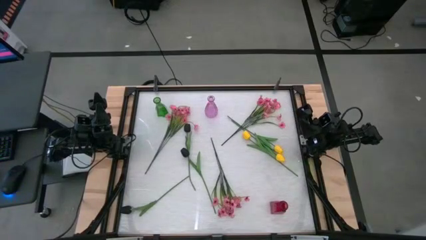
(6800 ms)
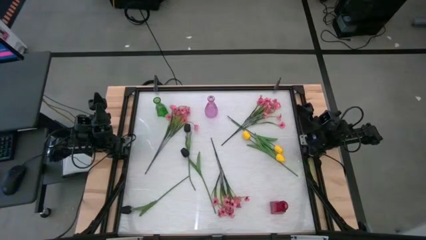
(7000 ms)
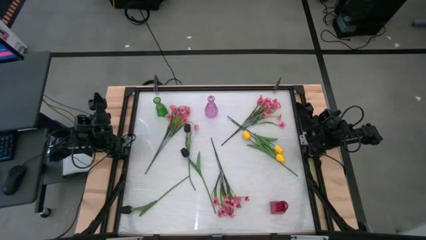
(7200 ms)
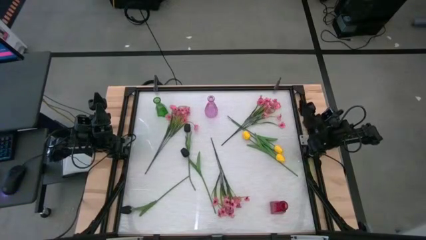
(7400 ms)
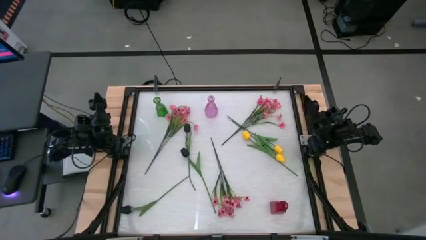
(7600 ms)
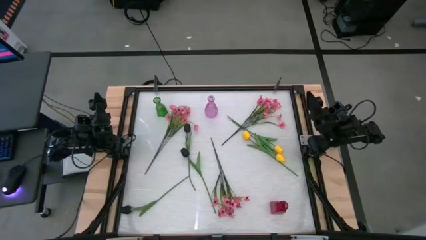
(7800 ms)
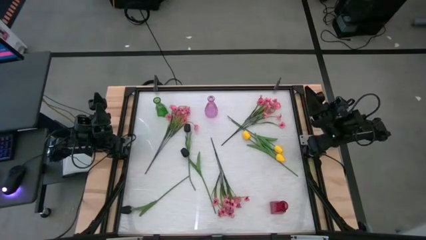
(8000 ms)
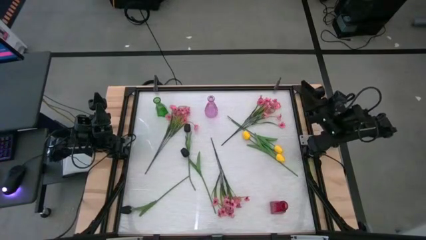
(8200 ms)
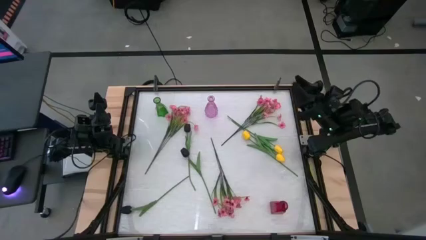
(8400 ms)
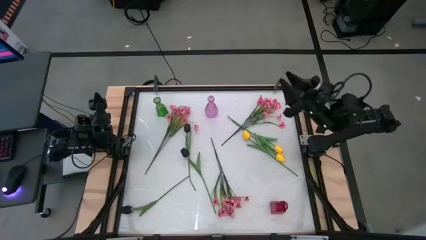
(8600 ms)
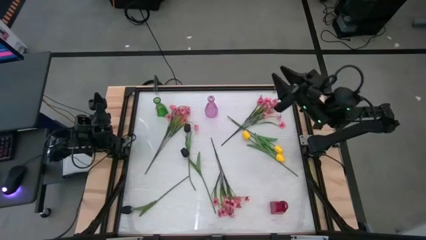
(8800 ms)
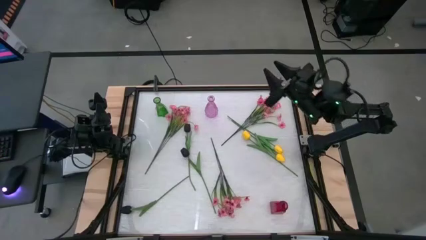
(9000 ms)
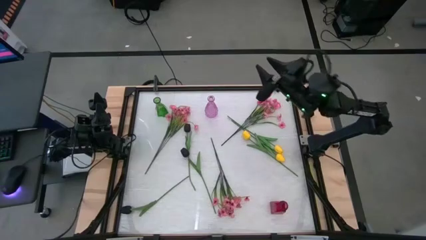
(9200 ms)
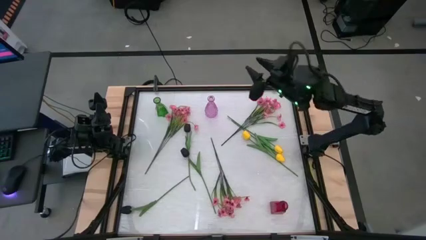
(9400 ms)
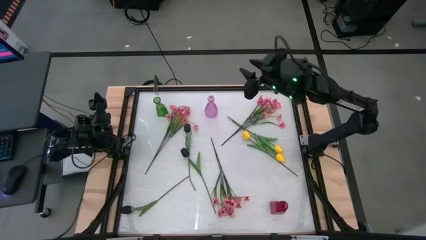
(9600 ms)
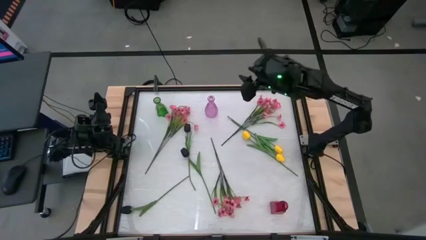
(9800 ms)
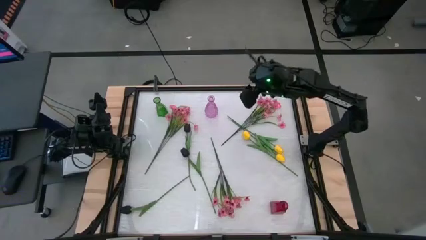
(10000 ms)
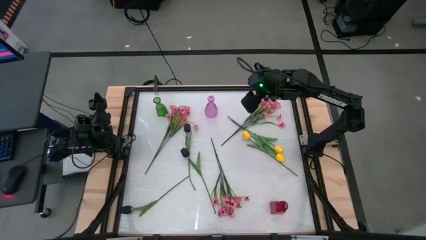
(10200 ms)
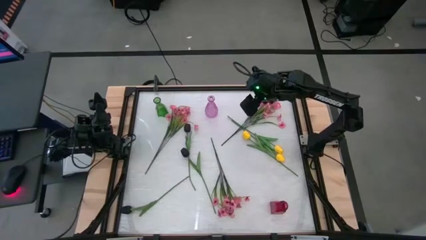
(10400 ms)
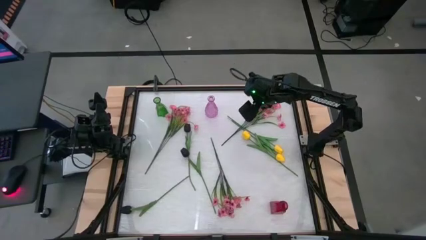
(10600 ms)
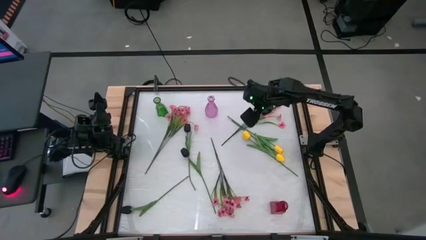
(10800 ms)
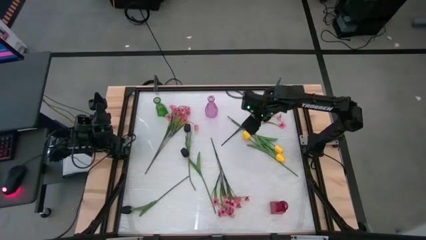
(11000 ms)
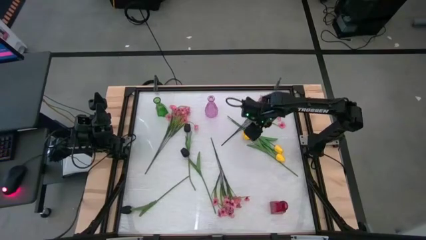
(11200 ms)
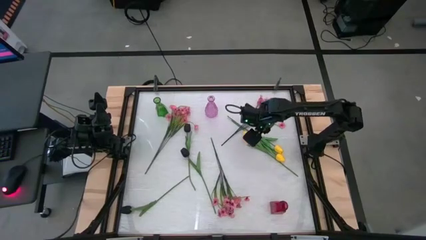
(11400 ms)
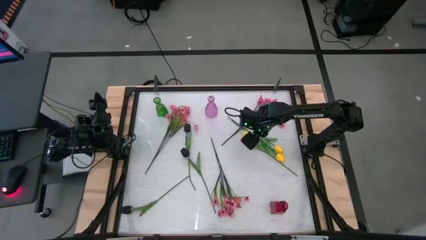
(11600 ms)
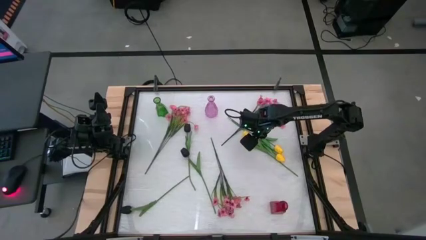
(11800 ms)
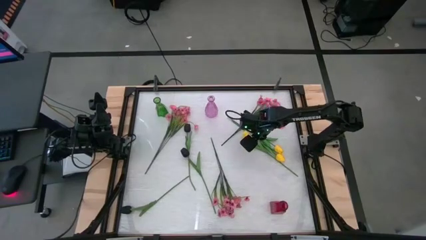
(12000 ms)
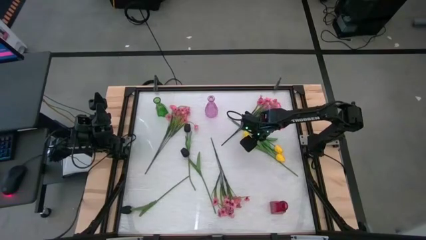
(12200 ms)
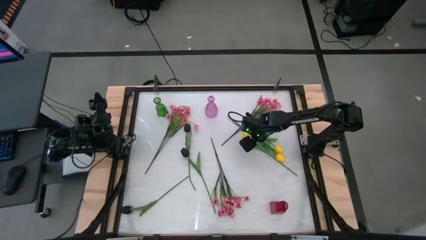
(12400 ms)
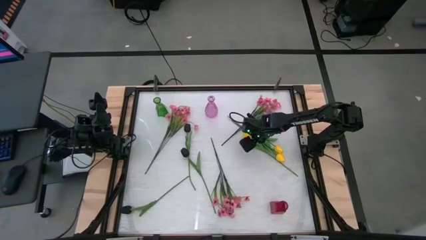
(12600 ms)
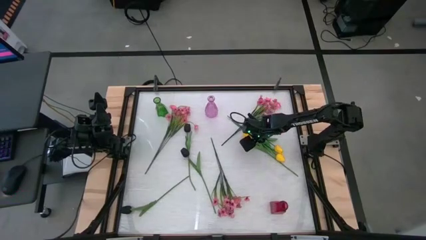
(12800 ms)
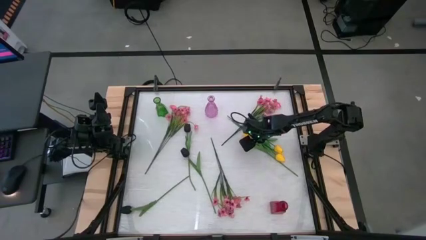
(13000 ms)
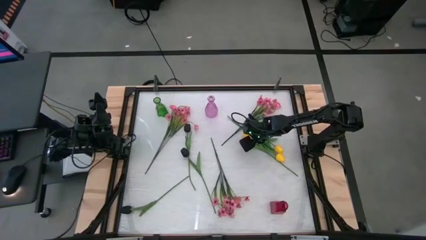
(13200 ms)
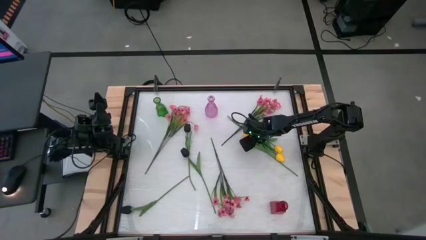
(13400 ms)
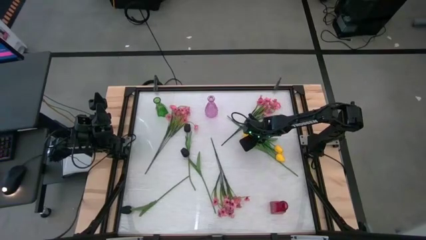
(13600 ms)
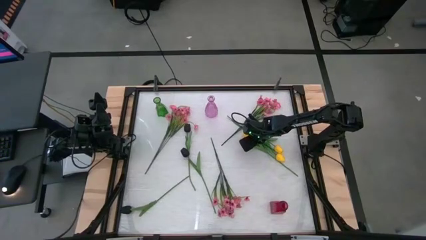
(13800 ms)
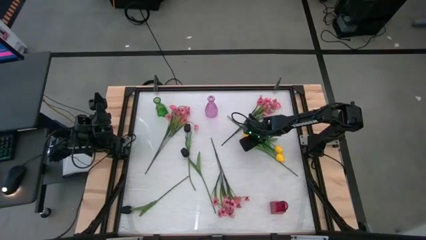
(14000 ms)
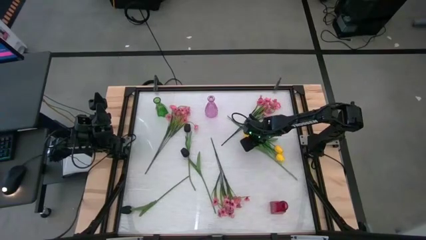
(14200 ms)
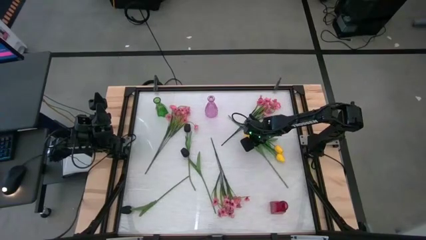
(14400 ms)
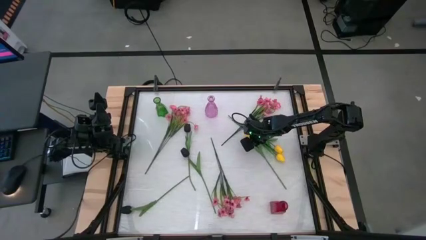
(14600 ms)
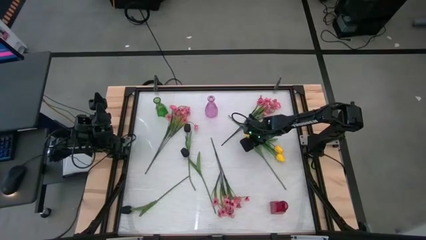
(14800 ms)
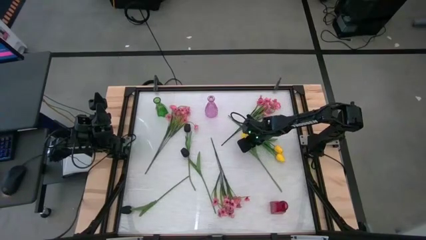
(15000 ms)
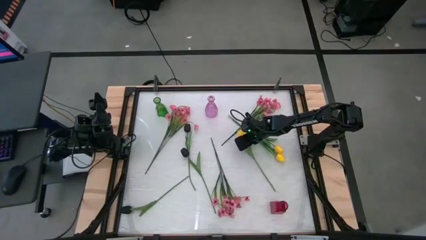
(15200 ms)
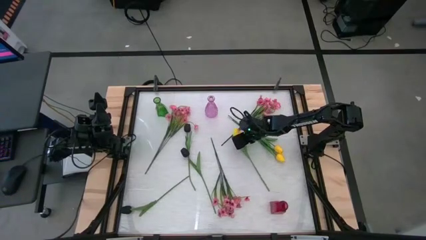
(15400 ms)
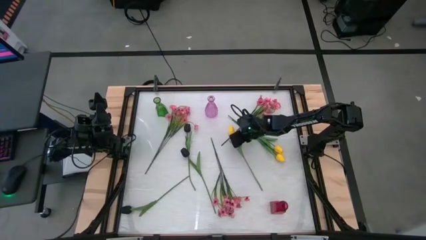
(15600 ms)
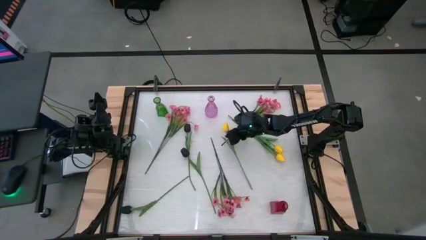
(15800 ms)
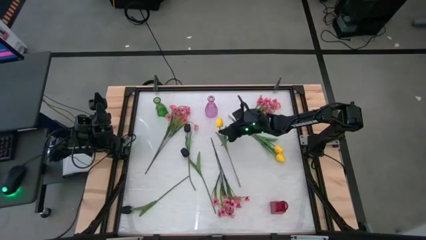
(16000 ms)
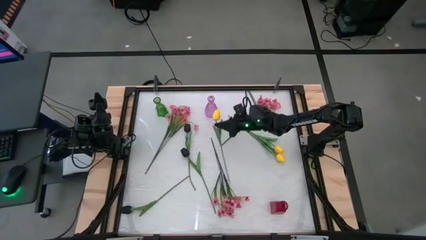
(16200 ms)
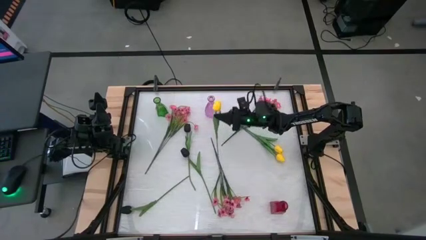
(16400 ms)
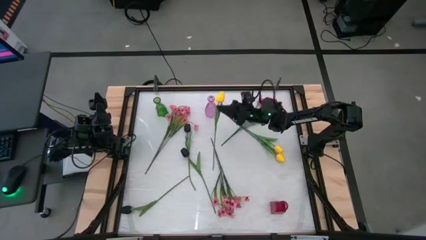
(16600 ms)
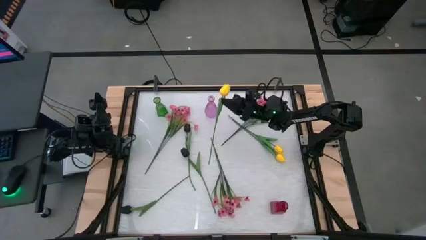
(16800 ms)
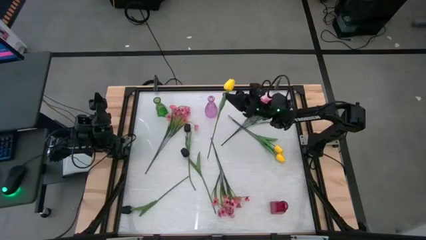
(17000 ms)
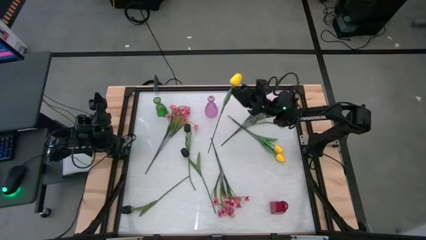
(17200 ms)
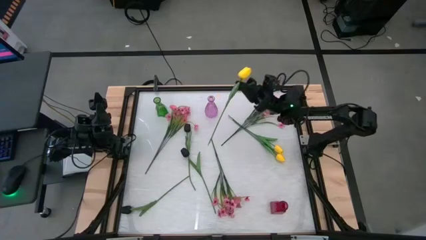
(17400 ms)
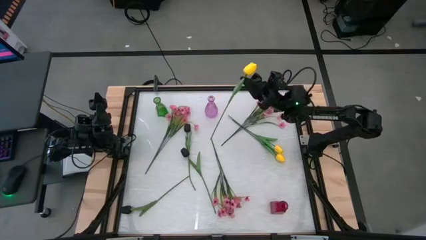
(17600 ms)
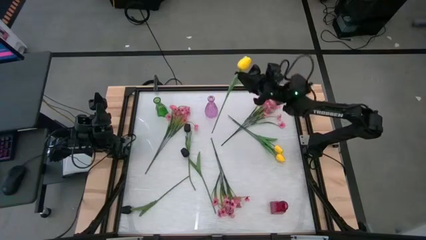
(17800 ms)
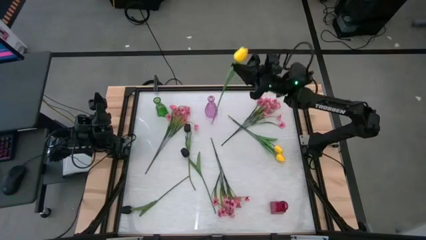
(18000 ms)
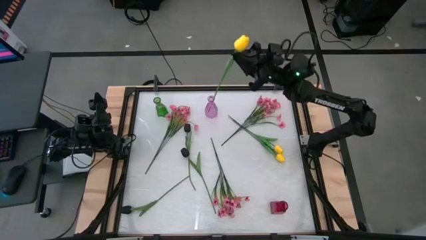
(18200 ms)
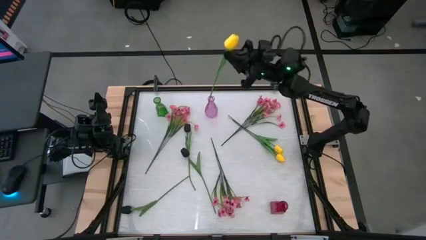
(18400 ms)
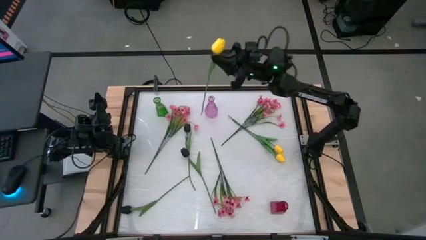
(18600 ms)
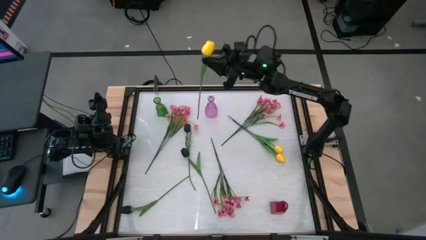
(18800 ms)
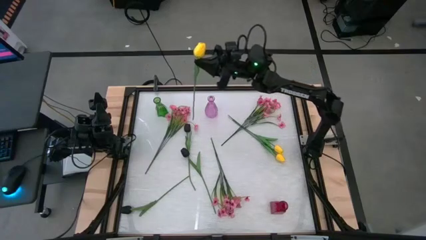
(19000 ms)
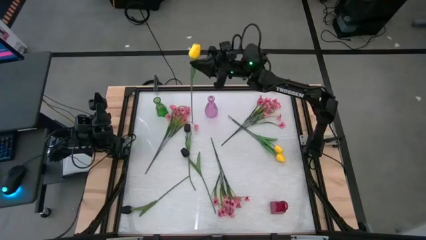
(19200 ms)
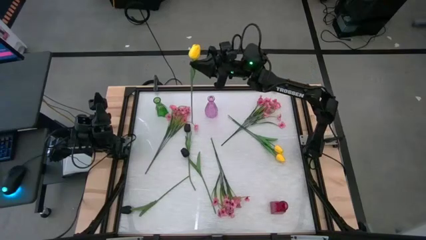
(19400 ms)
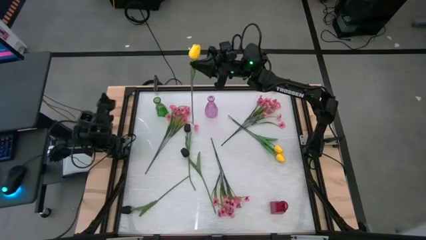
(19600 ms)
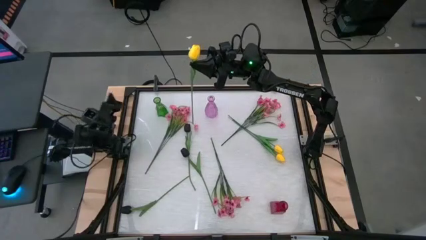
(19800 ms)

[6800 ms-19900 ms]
Task: Sort flowers into vase by color
Put the bottom yellow flower into the green vase
